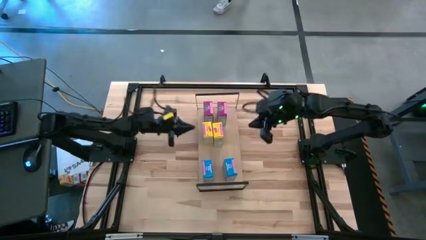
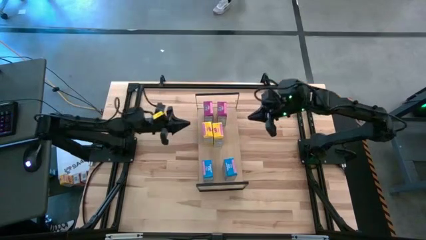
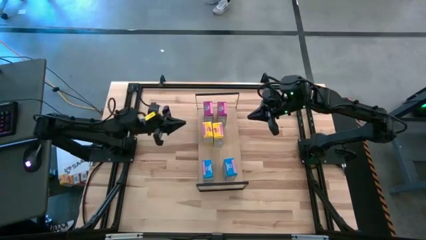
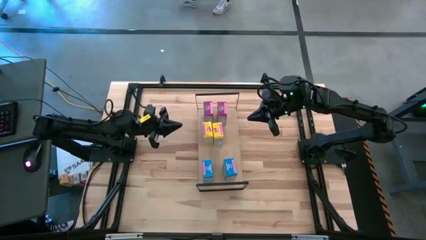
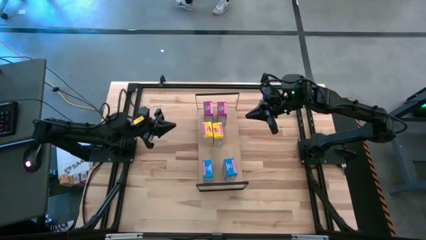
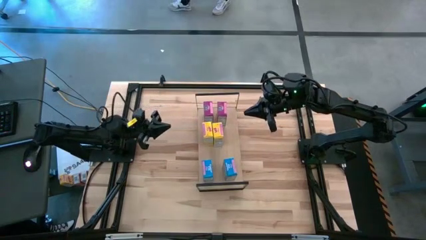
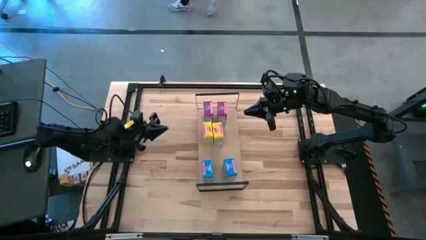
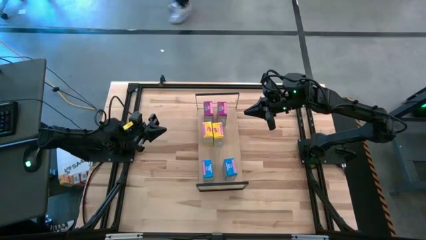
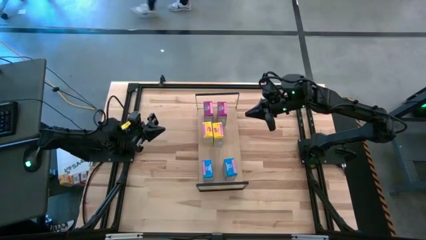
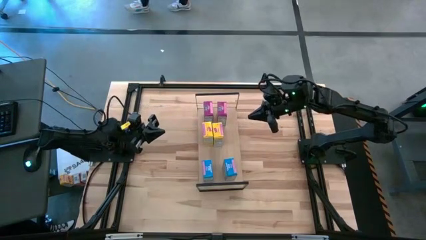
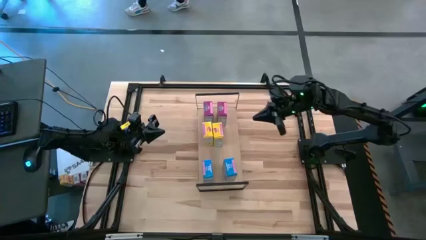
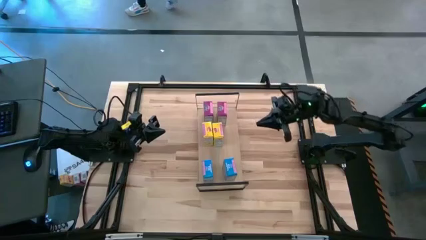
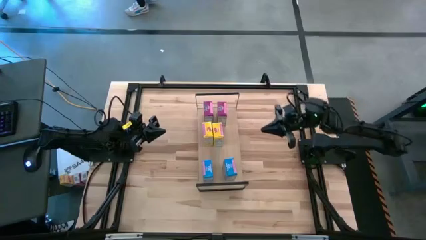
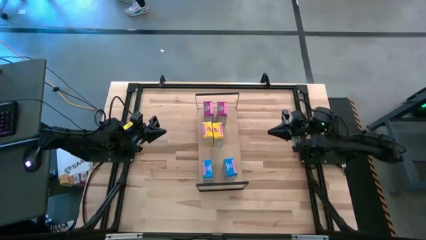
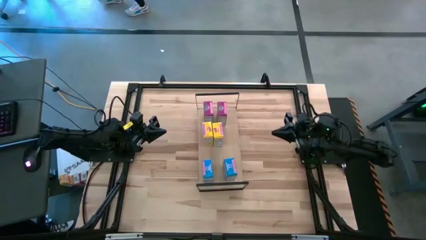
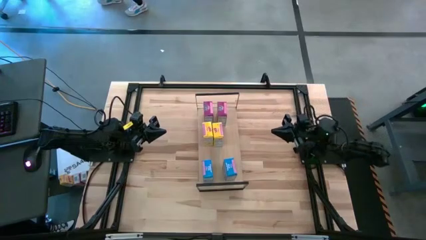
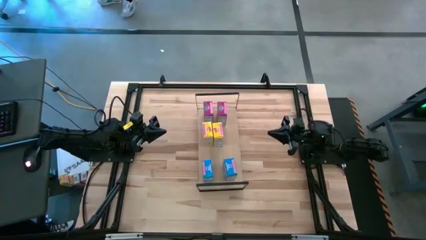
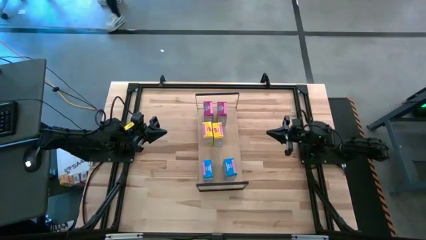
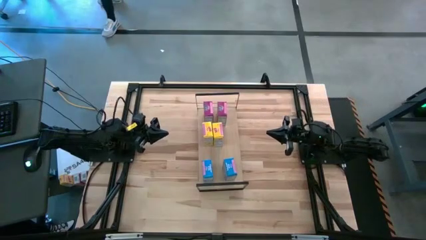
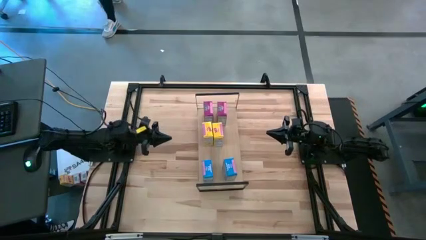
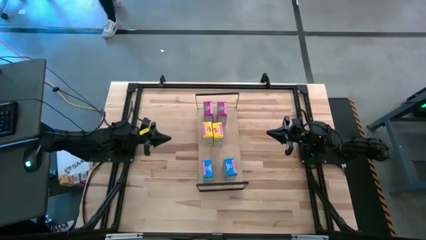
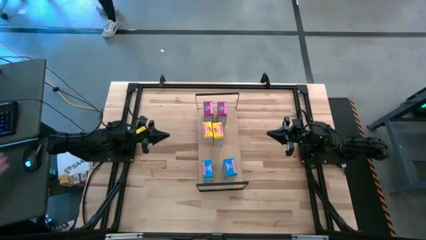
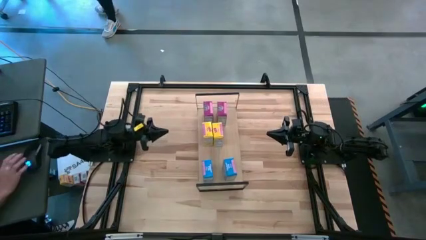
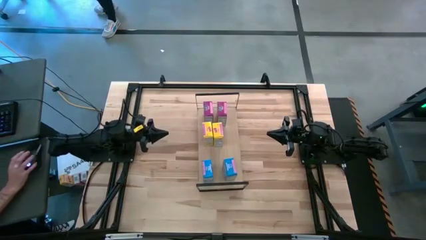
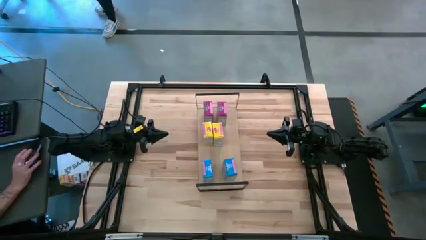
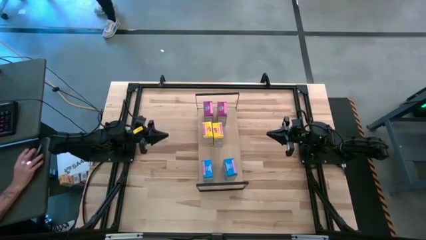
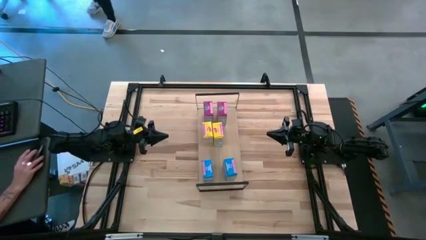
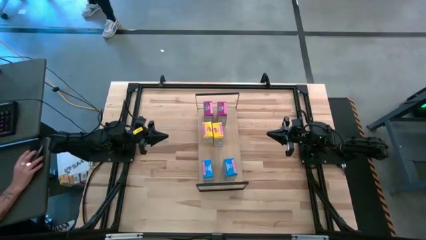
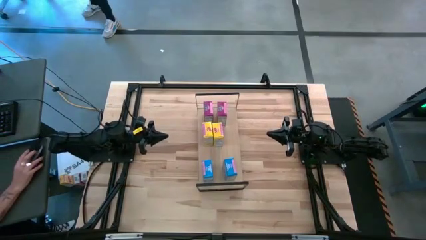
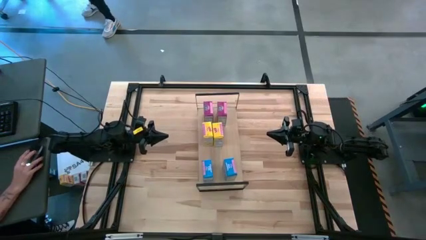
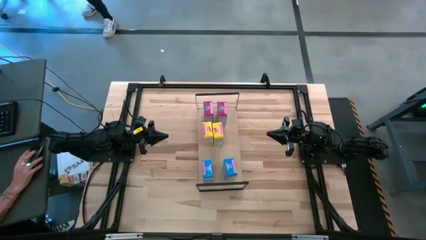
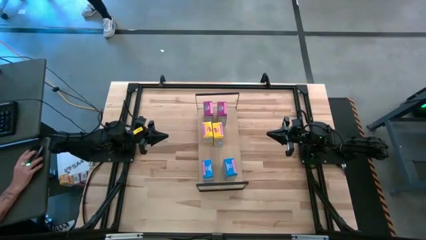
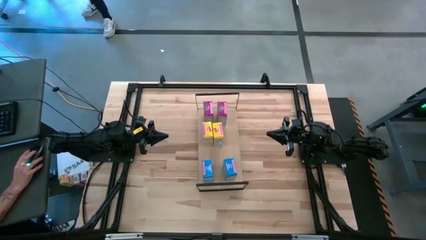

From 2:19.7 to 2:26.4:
Task: Stack cereal on shelf
Return to Home Position
